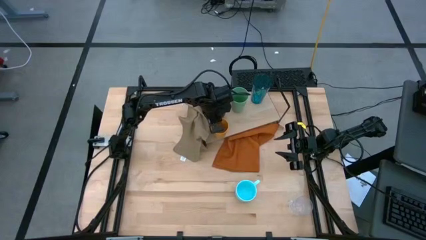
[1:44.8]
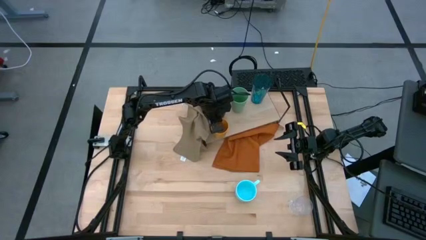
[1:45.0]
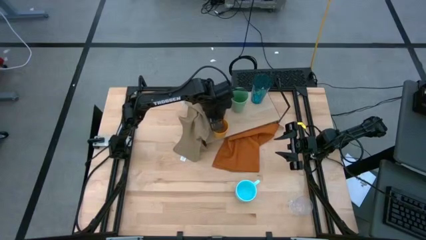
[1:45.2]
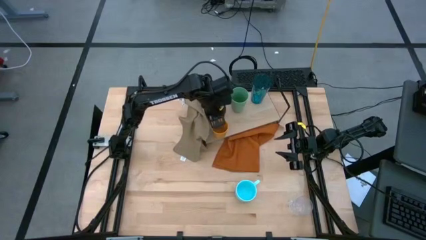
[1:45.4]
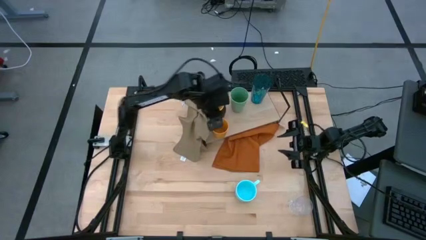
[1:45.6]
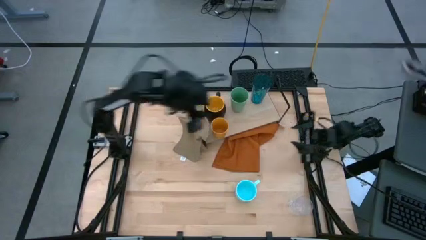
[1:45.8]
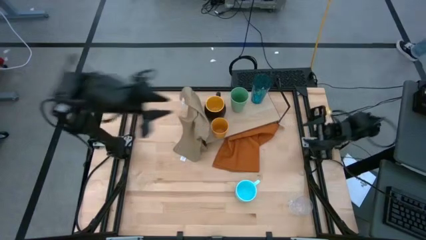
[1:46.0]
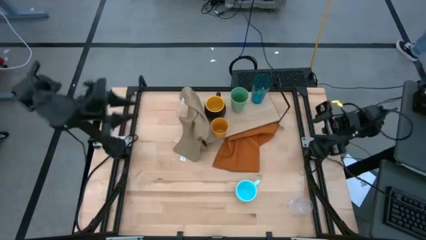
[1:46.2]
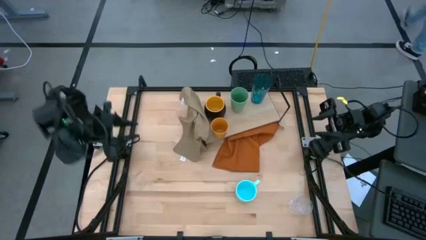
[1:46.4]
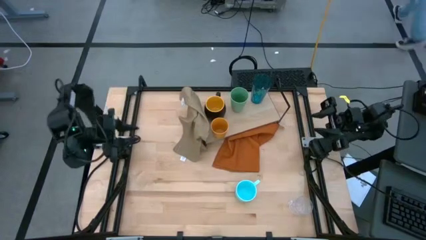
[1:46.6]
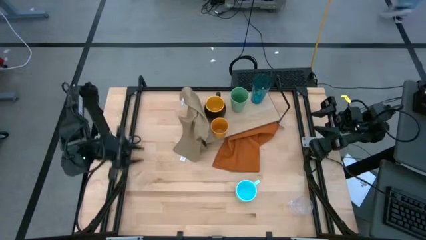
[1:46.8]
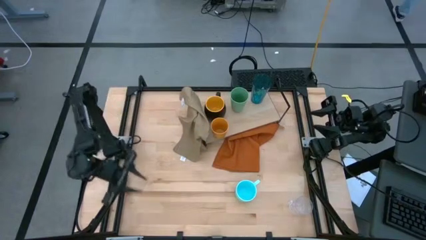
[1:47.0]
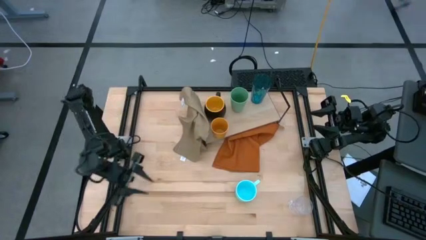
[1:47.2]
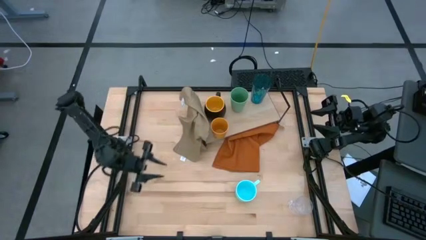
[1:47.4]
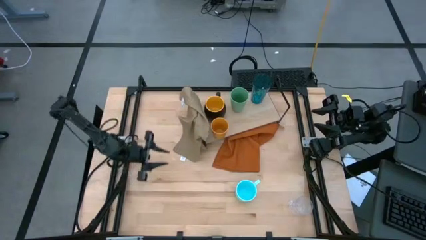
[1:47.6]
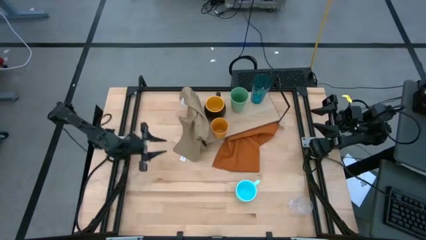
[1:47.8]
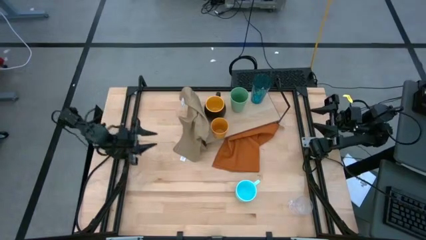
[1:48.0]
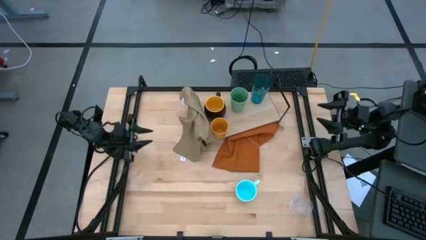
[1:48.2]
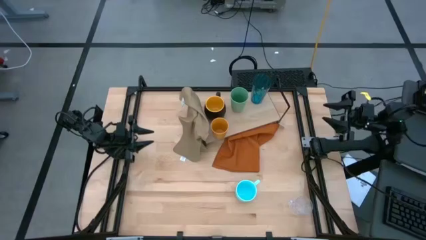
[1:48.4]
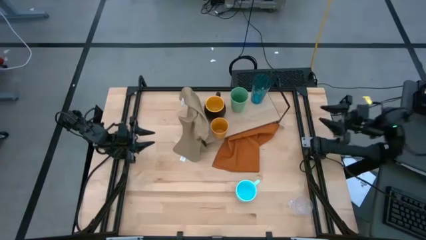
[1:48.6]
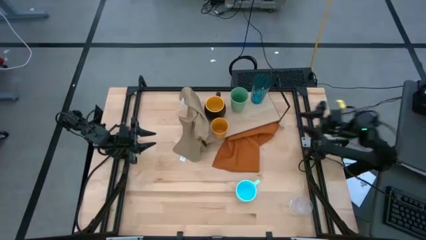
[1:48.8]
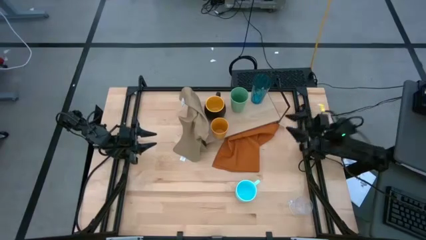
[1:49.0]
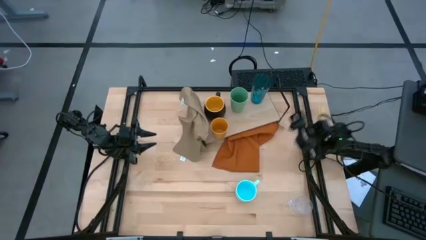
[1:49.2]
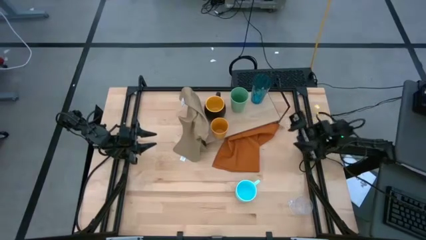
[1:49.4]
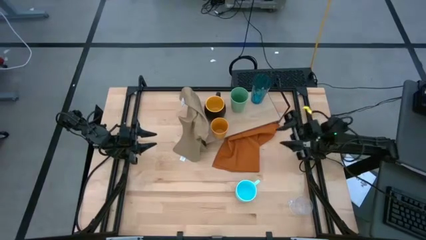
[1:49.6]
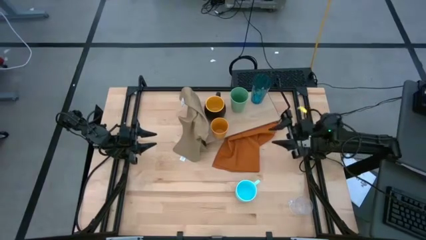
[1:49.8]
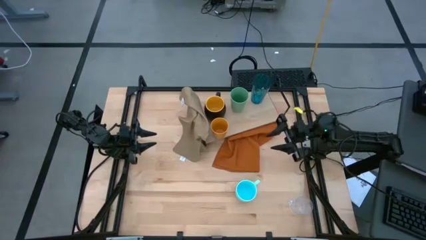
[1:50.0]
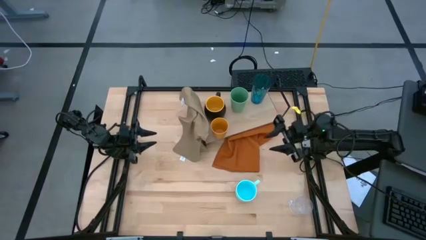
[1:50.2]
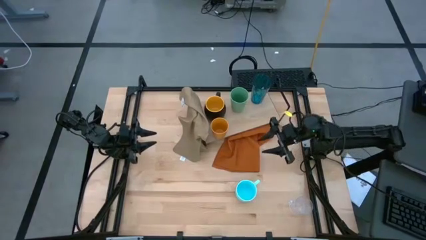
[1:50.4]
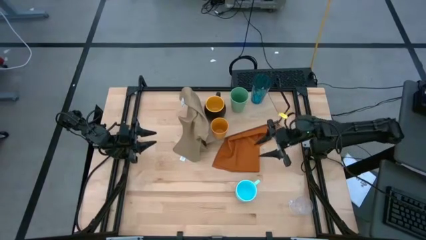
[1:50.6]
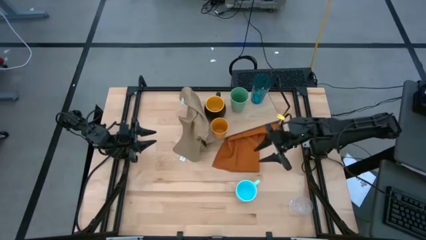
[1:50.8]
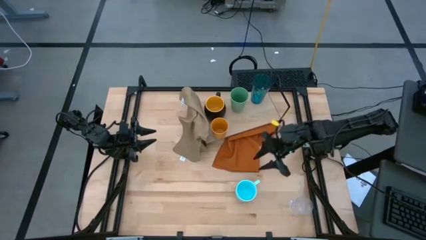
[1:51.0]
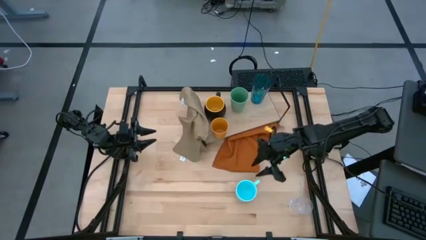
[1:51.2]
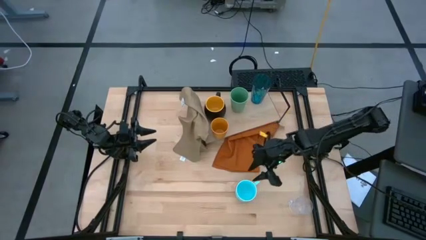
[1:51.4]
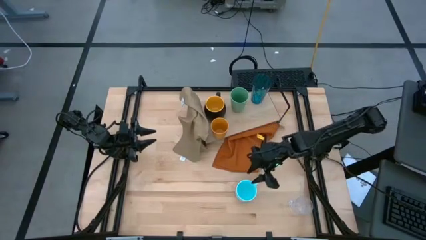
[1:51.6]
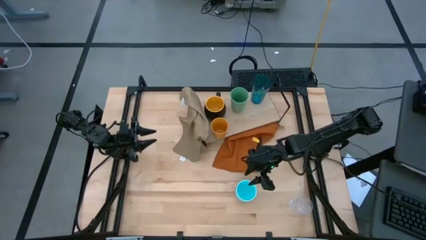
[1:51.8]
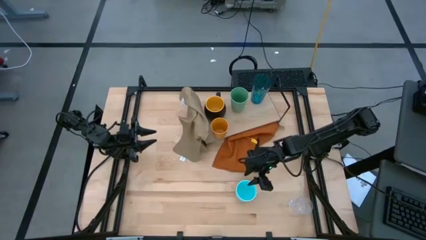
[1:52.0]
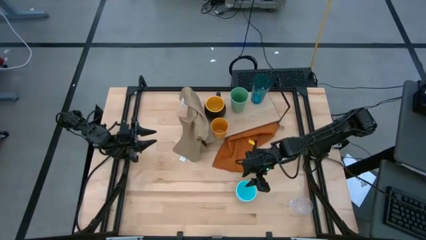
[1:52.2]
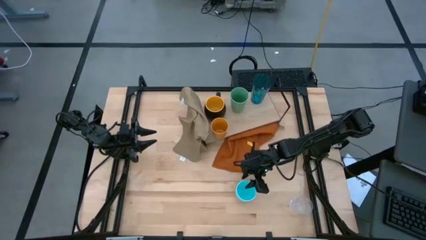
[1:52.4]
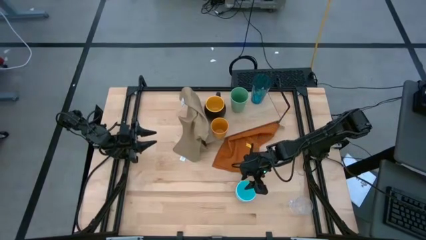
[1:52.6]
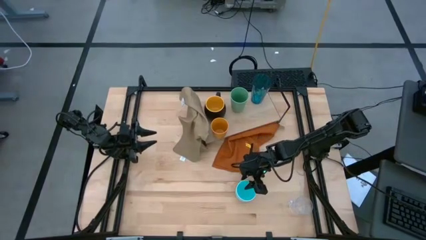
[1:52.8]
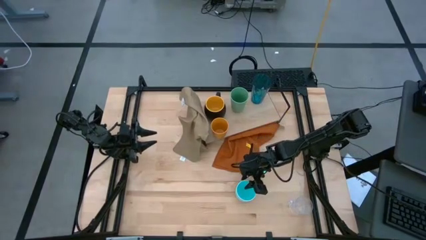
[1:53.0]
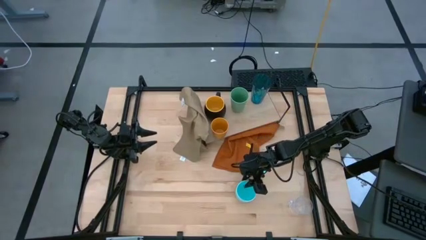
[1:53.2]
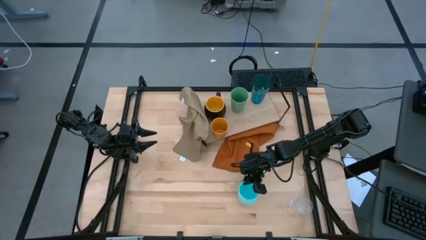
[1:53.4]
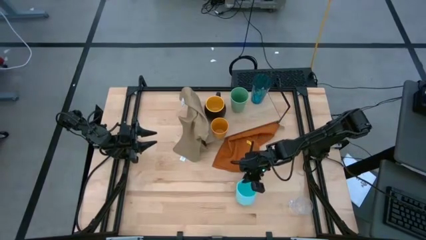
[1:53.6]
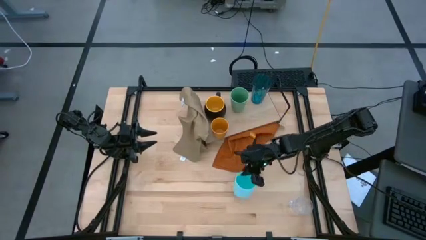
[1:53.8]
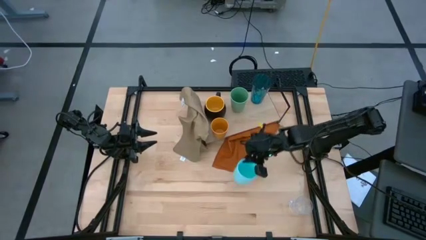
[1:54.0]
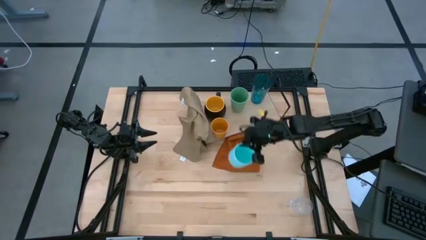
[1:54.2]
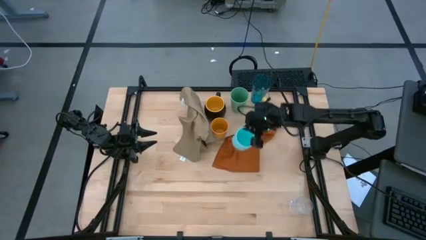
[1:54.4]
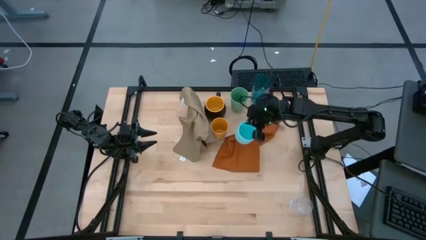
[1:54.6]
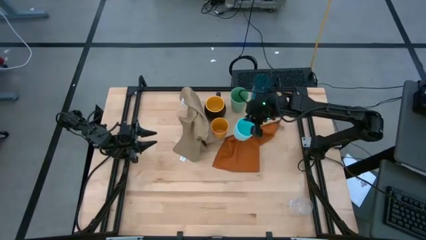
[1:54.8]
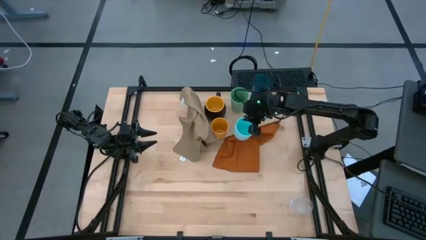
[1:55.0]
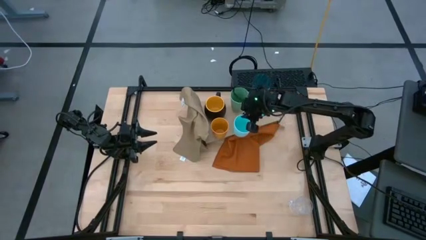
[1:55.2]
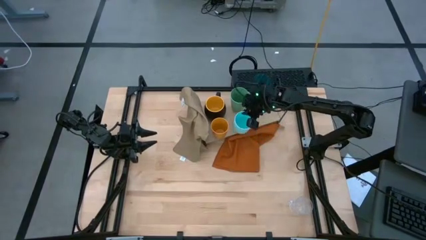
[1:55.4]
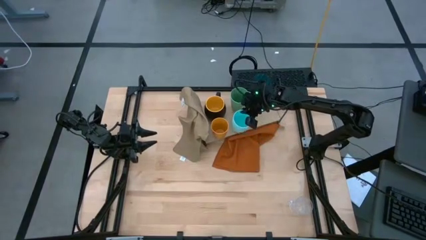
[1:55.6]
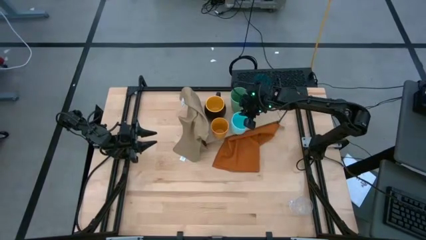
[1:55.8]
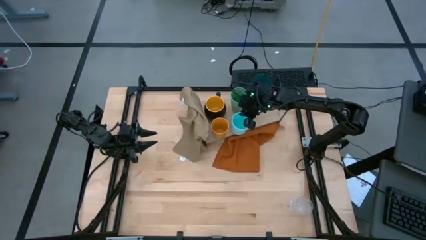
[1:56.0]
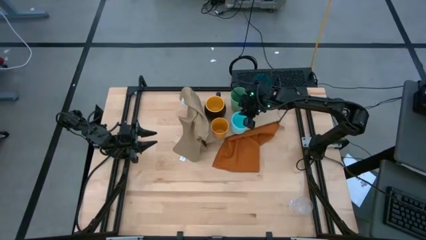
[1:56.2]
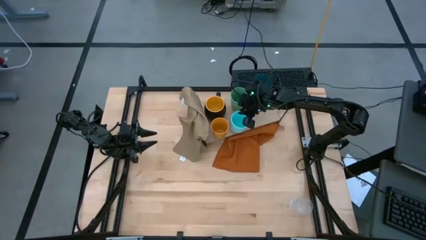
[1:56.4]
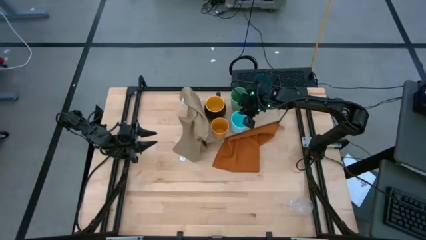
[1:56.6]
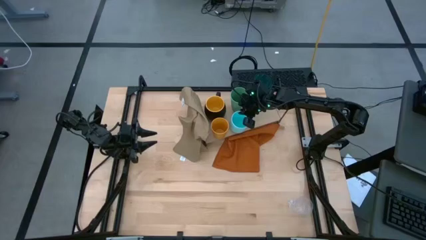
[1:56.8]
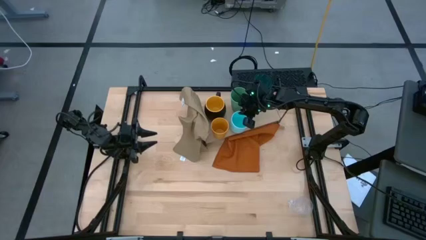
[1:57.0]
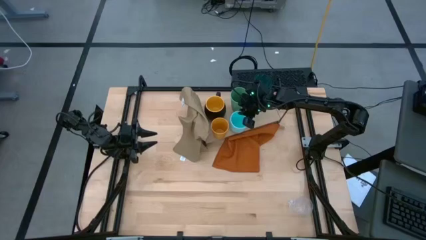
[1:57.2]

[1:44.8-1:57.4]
Task: Stack small to large cups/mugs on shelf
Put the light blue mug on the shelf

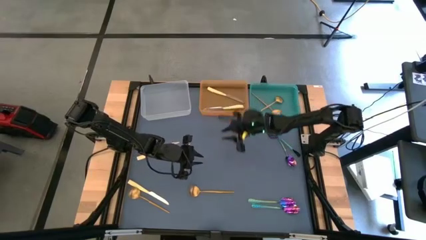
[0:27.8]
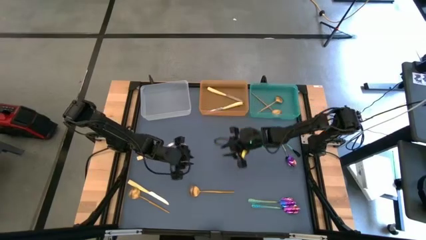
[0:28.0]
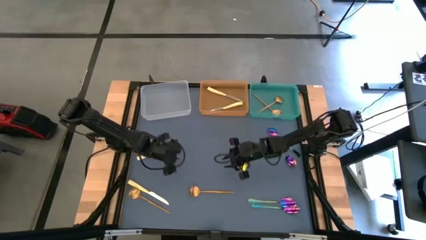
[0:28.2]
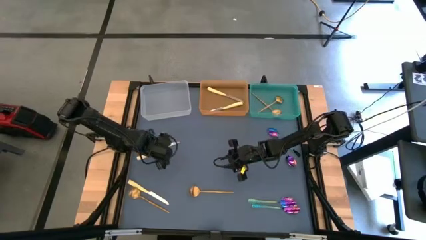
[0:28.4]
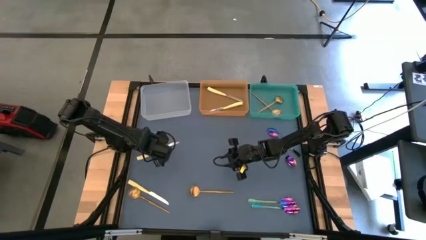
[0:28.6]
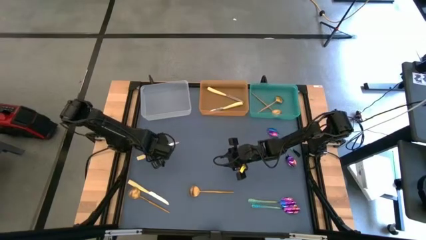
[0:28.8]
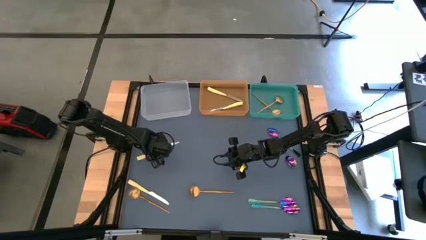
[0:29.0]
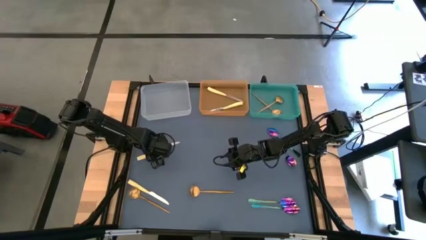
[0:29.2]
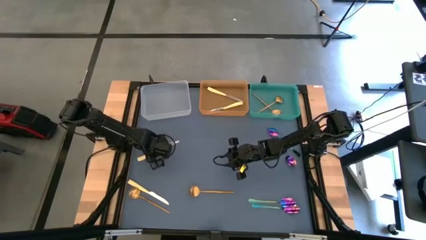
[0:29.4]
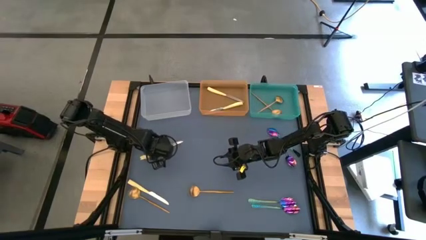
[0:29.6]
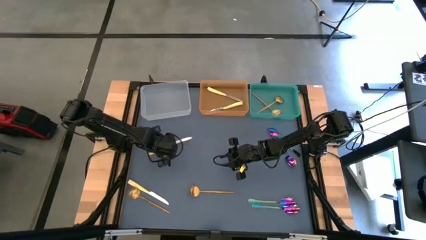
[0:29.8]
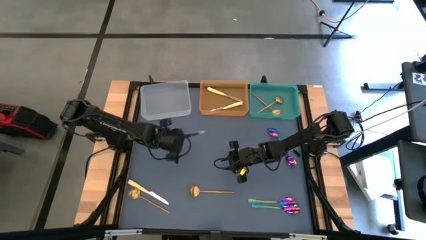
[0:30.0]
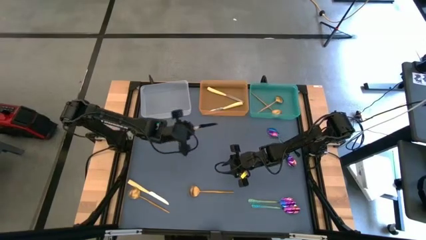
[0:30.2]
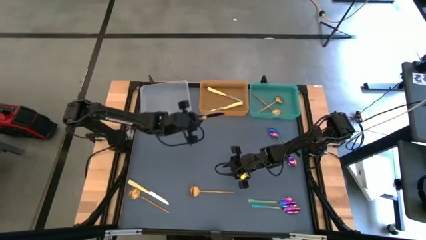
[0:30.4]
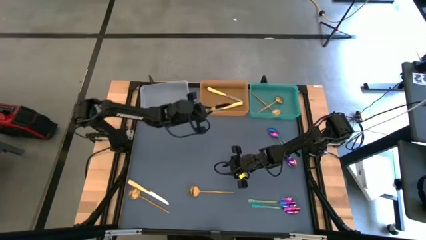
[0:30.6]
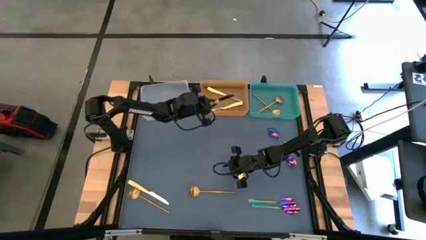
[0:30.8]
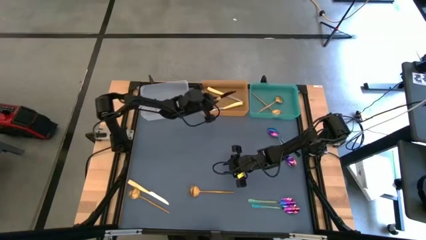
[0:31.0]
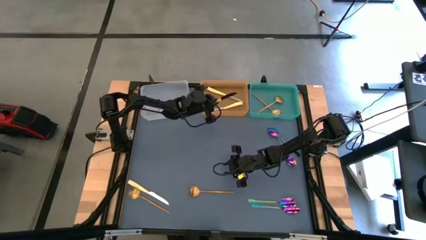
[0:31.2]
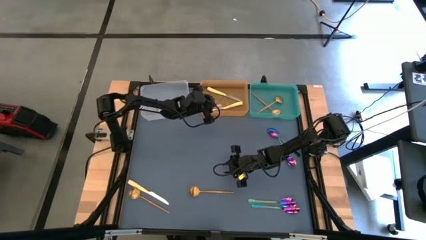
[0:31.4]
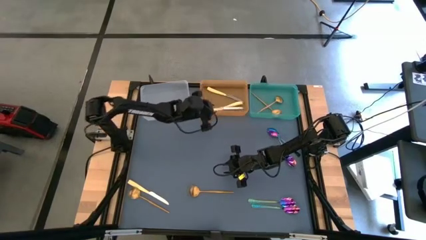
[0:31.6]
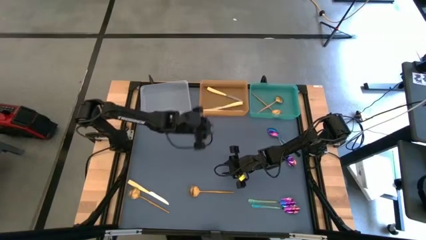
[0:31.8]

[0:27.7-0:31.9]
Task: Sort silverware by color (type)
Put the yellow table knife into the orange bin
